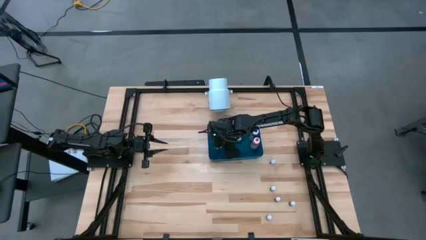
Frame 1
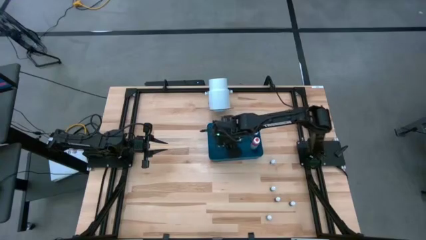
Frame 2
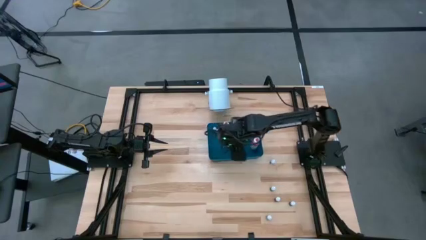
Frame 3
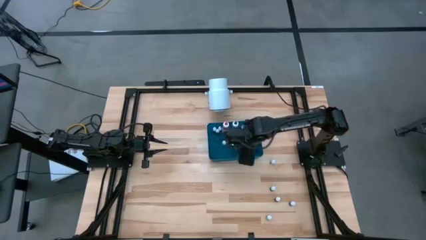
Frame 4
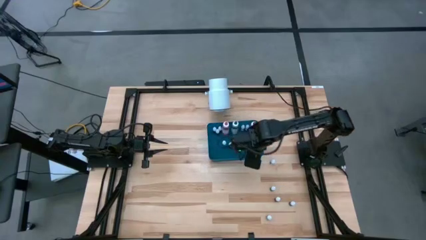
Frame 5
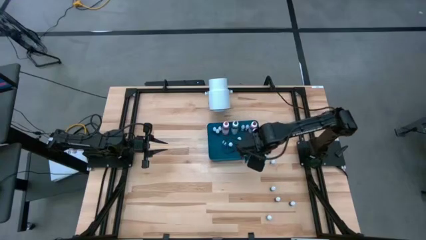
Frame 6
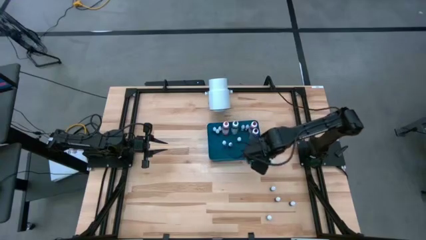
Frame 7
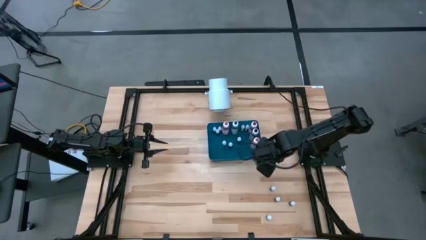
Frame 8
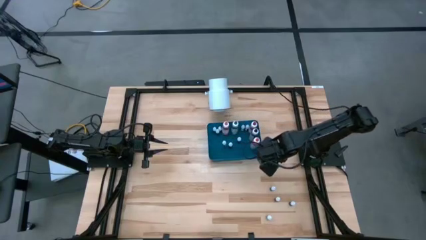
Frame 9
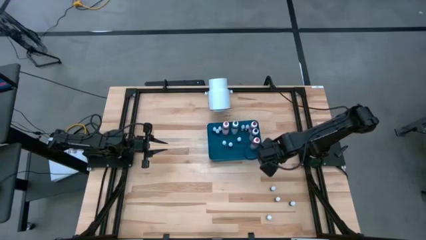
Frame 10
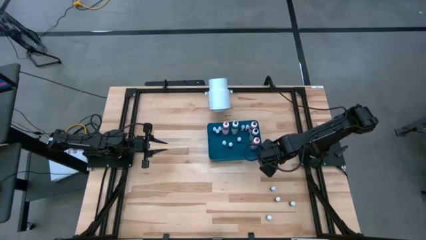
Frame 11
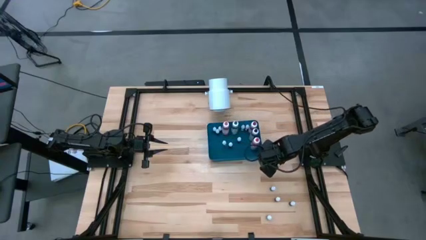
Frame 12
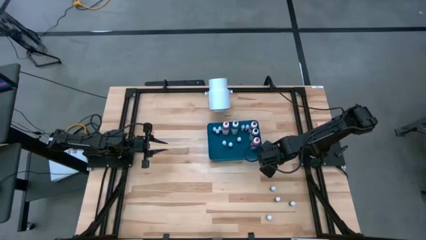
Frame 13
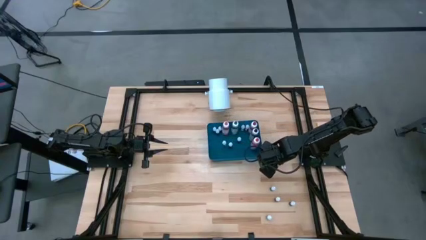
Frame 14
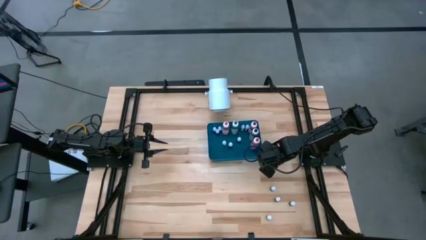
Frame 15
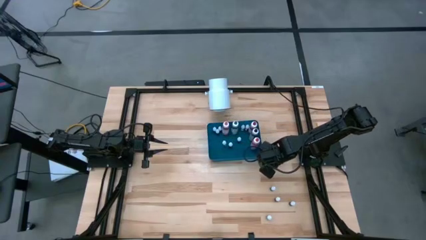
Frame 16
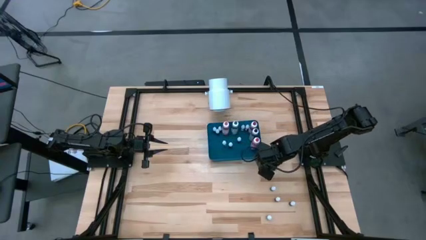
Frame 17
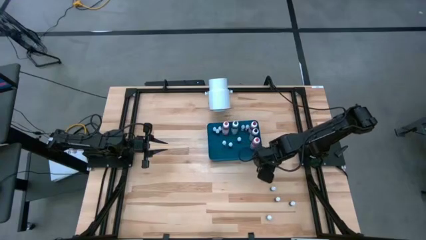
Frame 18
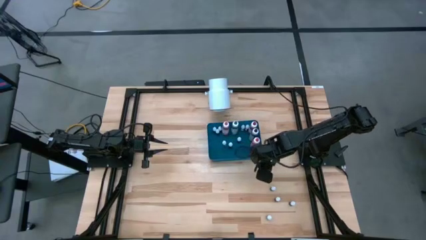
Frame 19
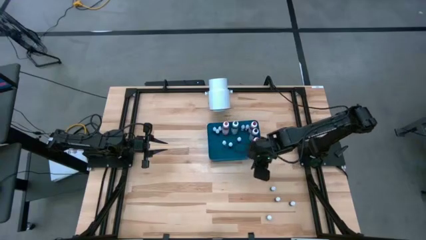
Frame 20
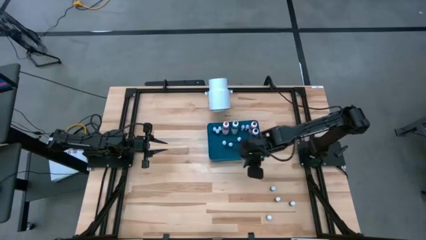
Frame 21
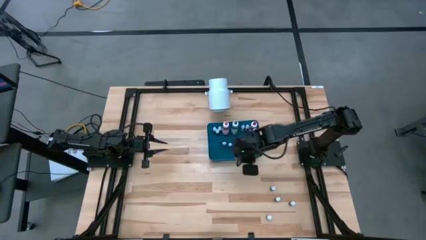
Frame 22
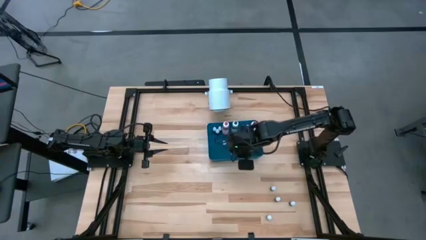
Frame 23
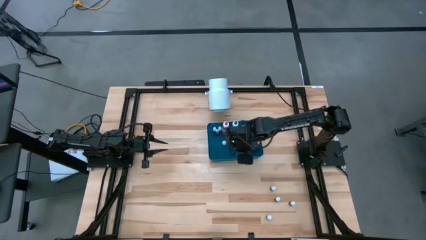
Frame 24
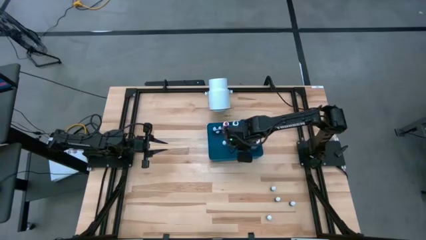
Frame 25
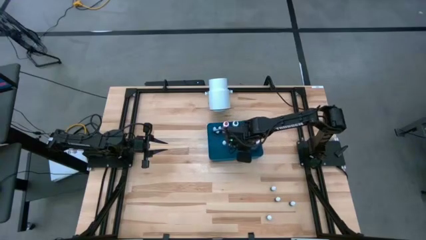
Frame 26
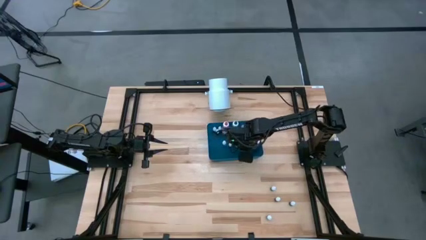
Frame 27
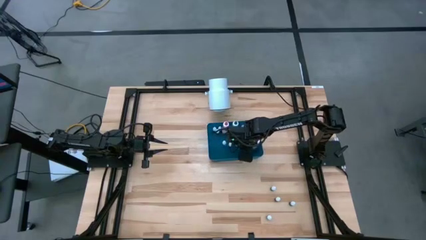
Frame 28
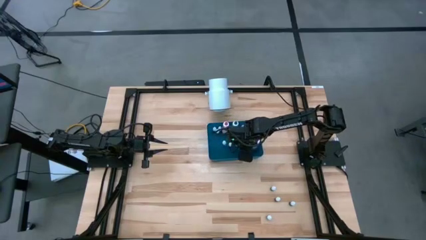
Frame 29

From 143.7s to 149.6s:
Task: Pick & Place food coloring
Put the small brown food coloring bottle into the blue bin

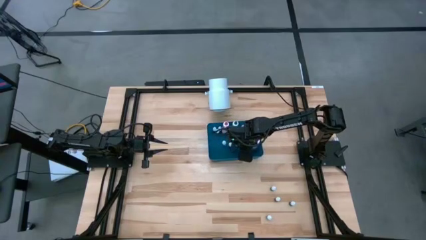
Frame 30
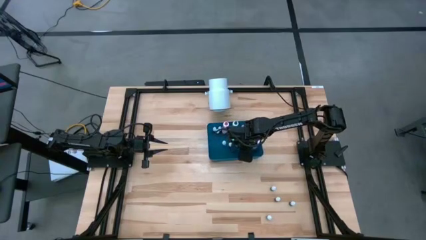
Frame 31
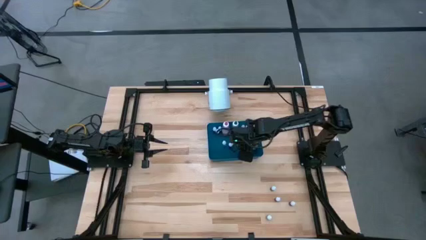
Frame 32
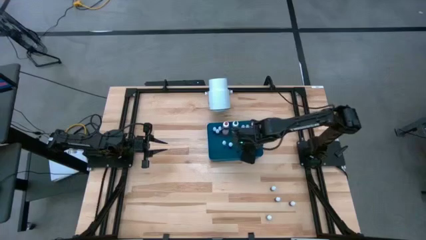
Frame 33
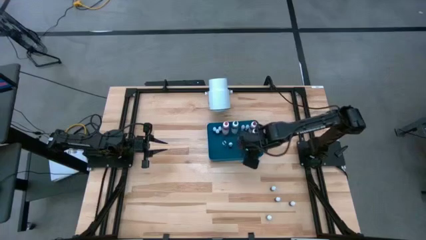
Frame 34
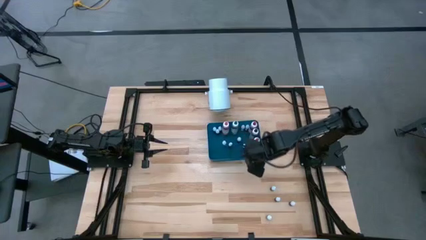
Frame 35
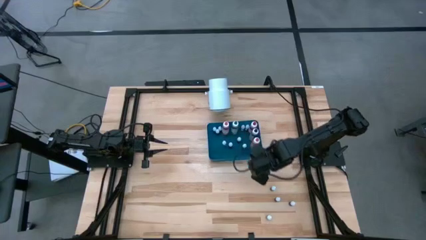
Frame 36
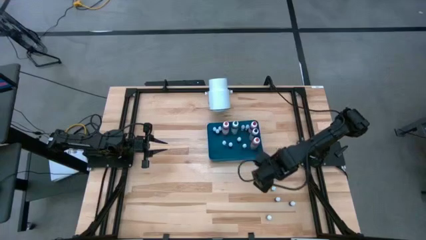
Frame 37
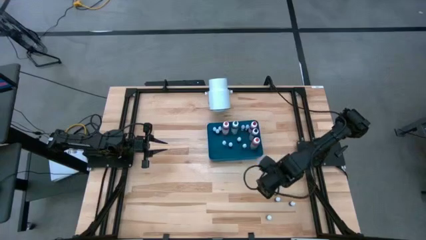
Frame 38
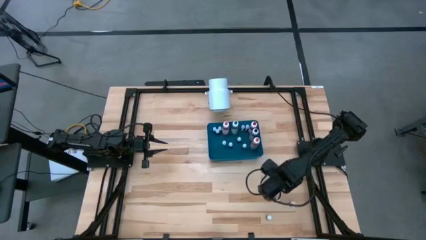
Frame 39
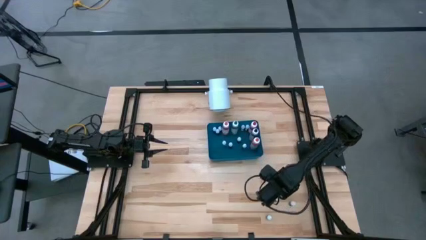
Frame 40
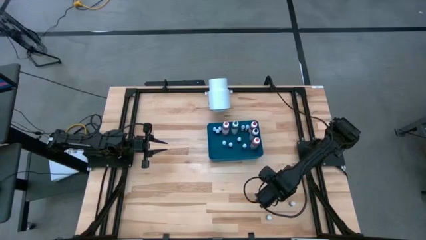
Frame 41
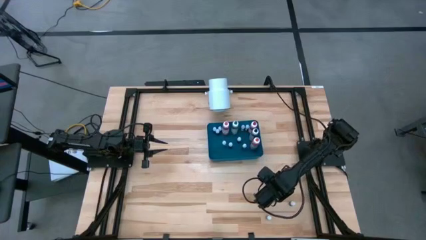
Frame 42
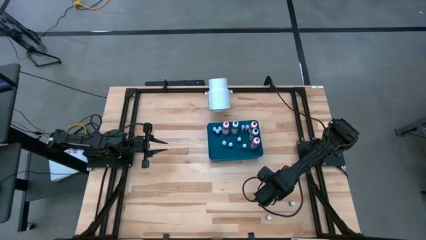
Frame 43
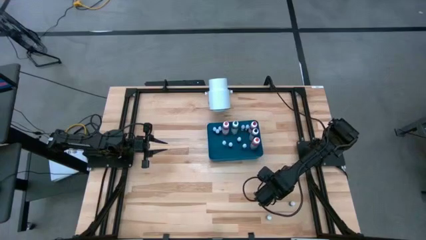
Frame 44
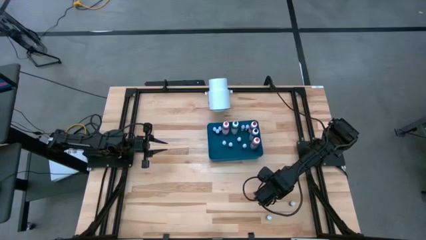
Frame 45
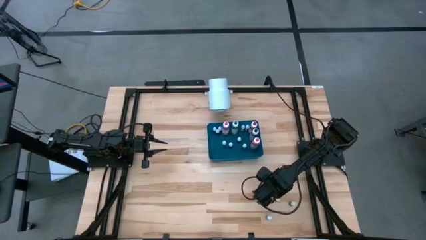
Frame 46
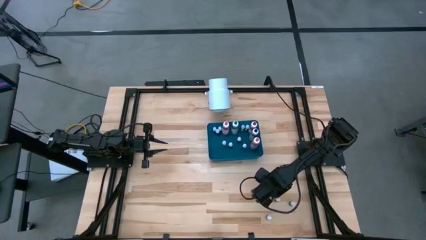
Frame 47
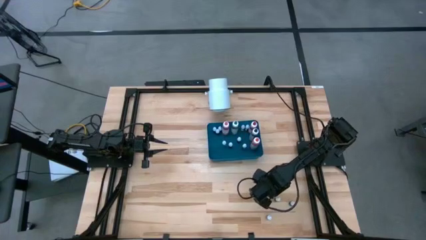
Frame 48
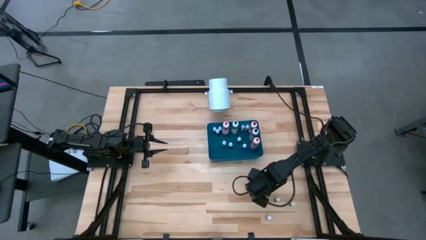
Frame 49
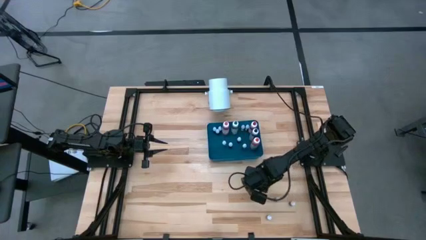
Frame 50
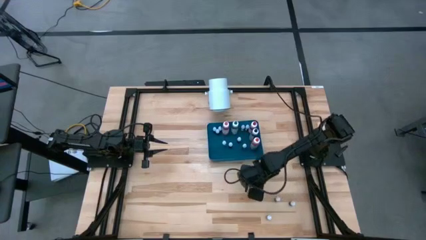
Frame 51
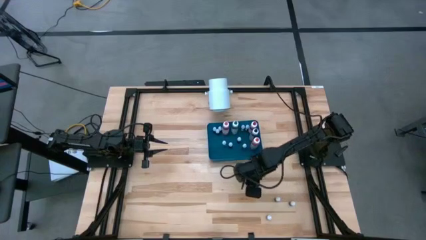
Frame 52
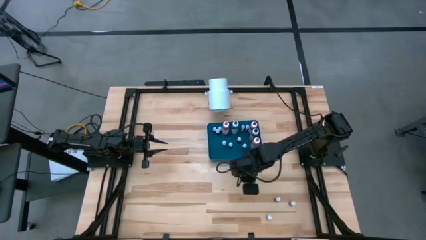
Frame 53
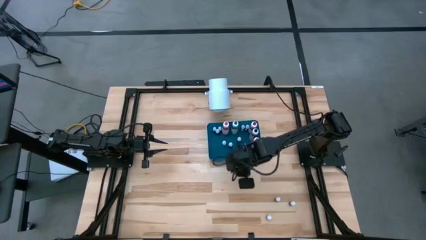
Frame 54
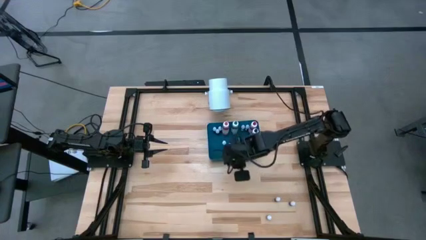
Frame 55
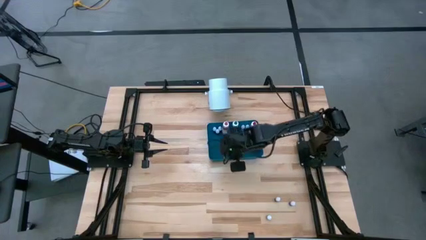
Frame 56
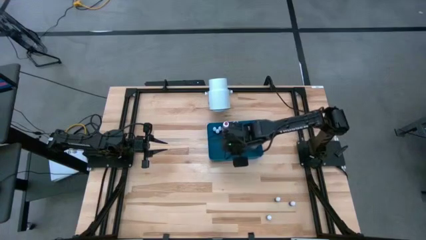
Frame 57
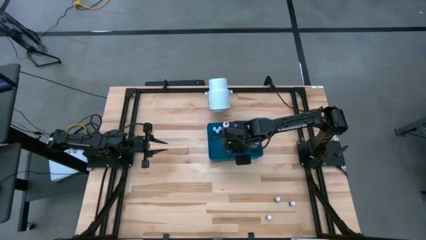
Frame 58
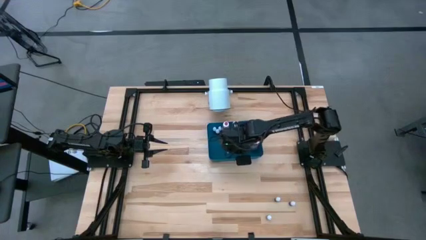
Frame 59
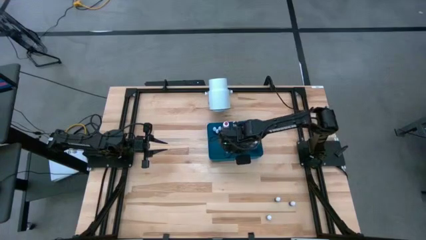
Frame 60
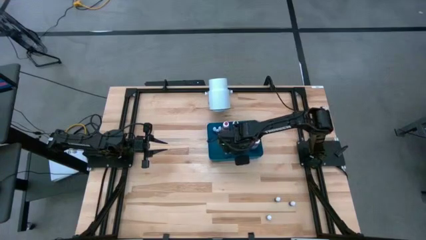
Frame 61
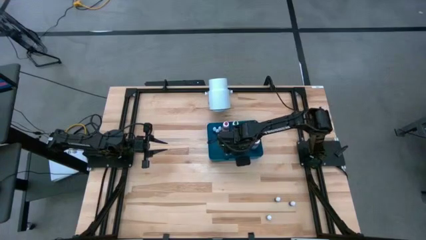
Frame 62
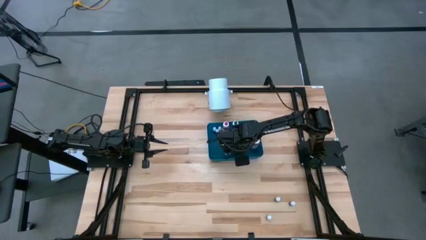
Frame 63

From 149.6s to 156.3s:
Put the top small black food coloring bottle into the blue bin
